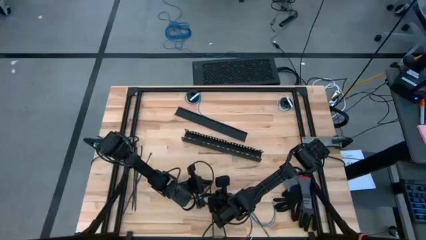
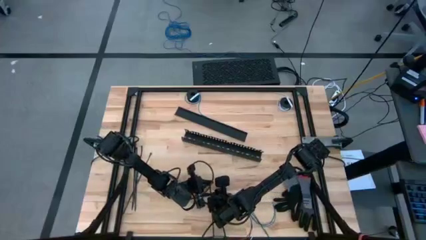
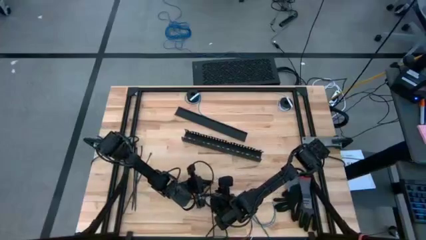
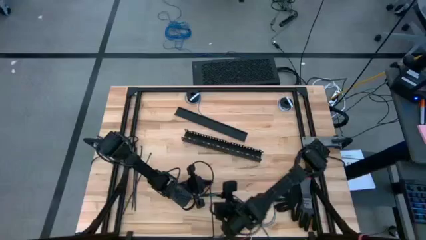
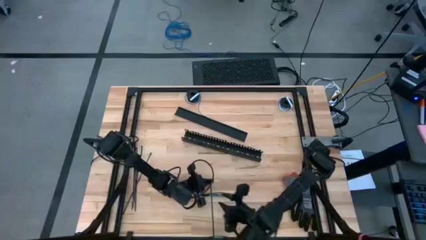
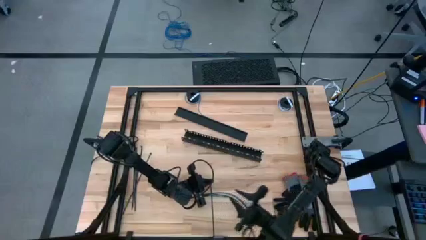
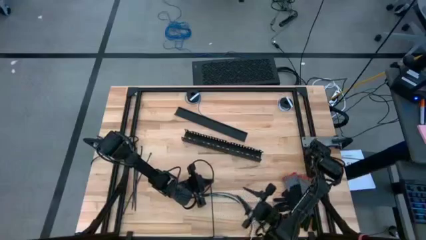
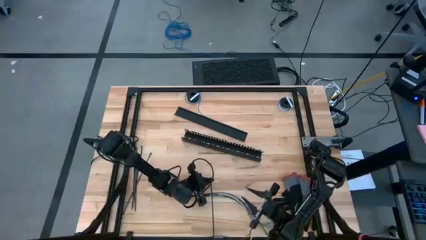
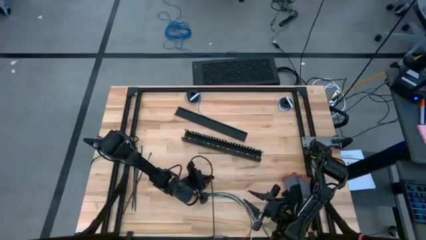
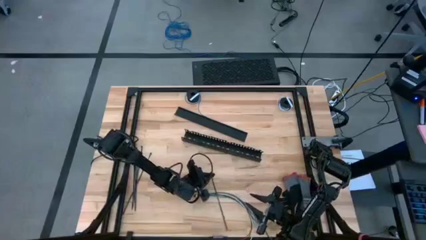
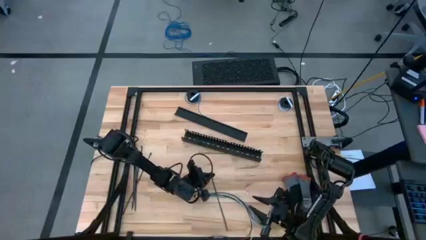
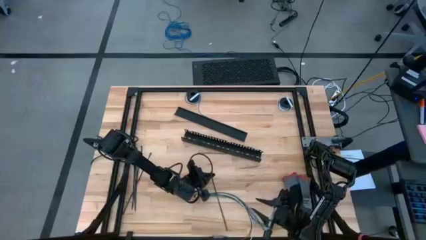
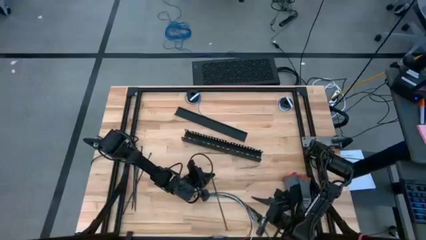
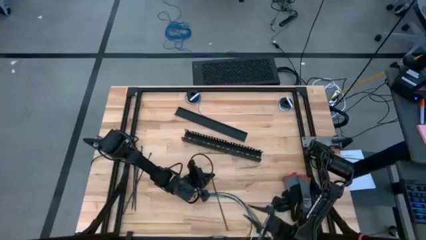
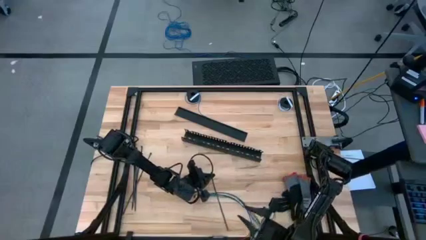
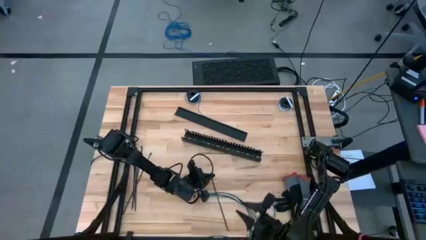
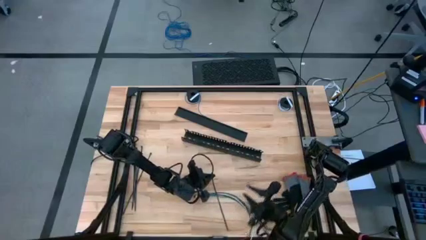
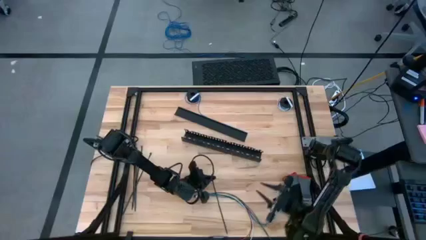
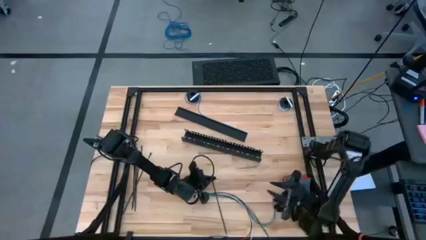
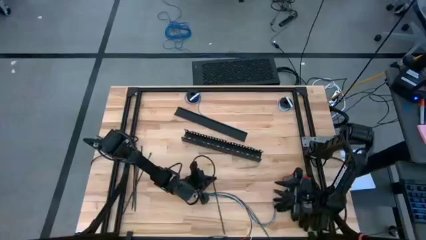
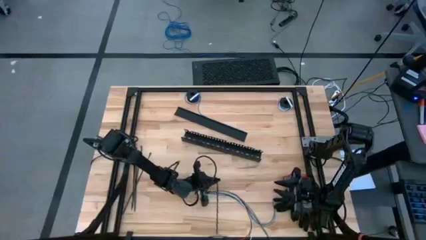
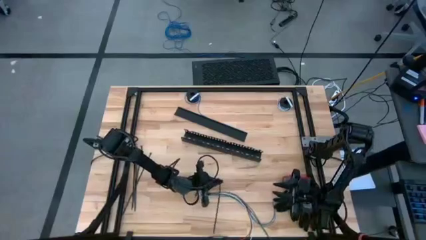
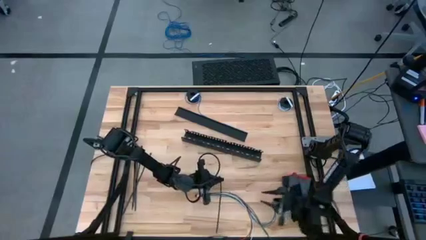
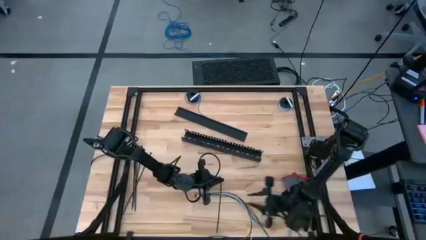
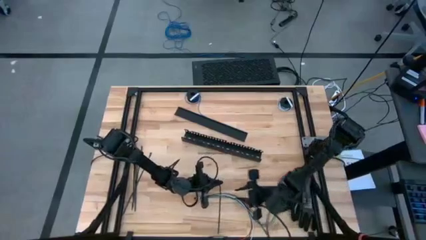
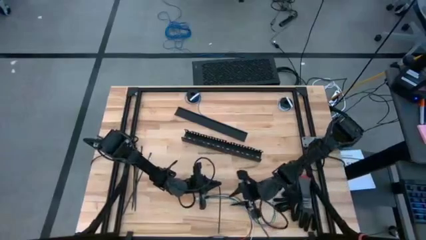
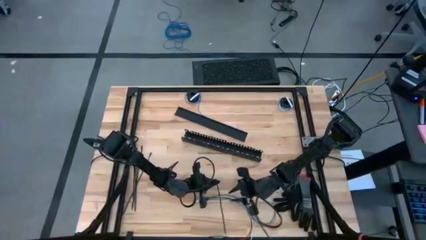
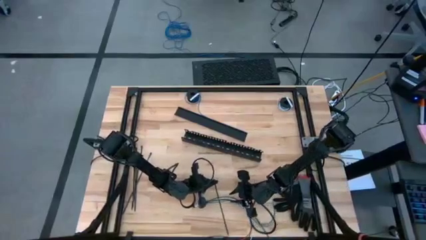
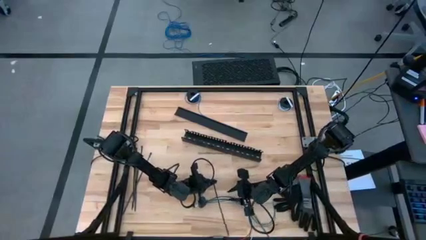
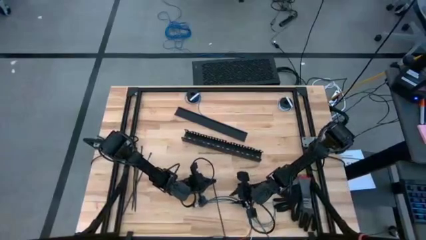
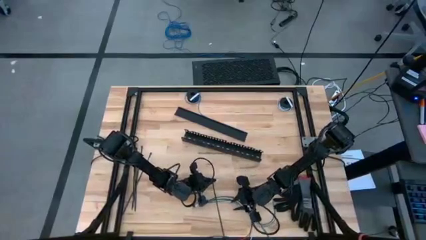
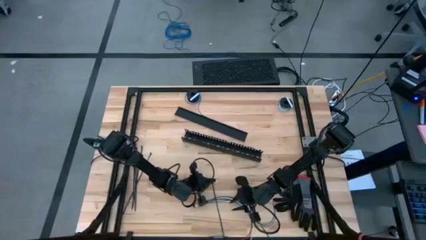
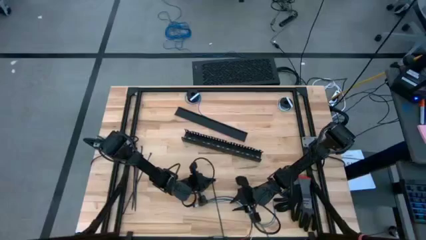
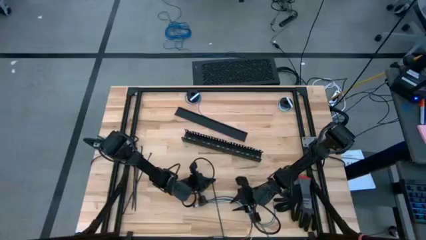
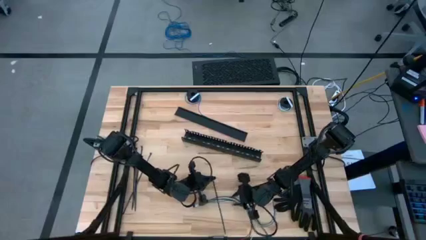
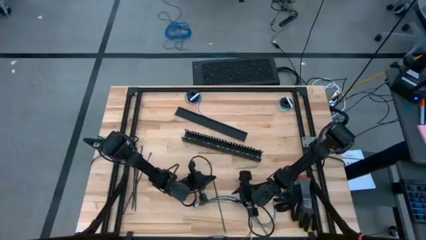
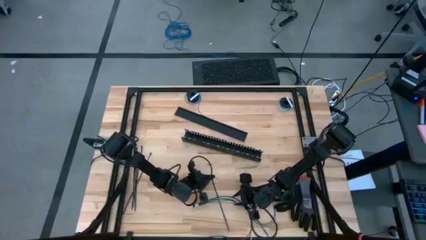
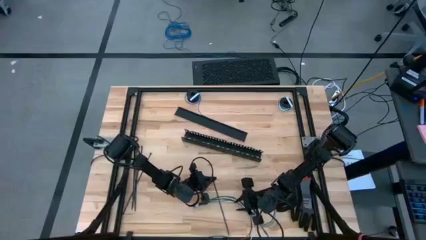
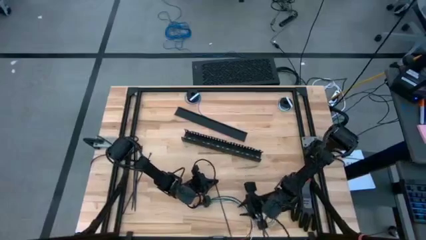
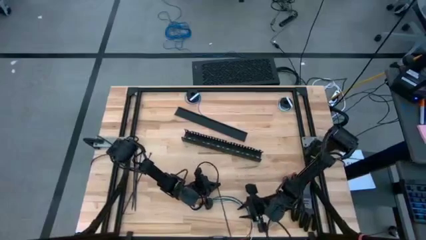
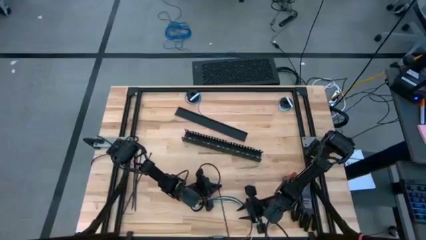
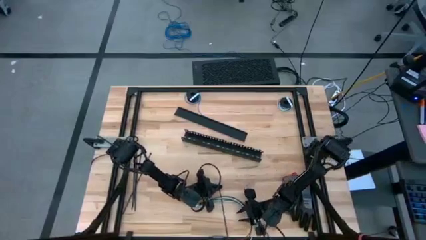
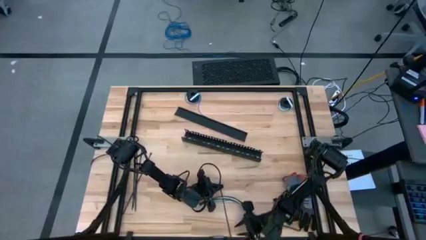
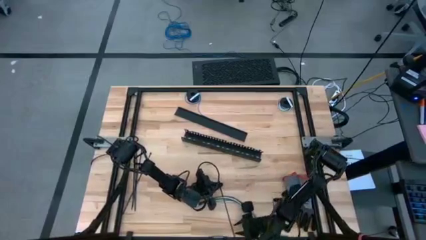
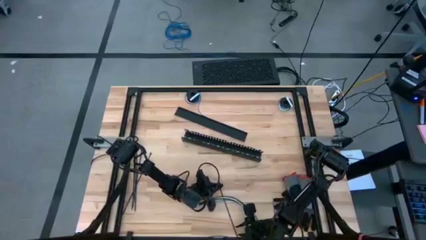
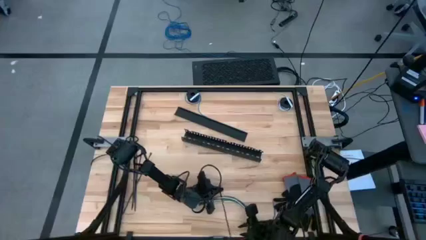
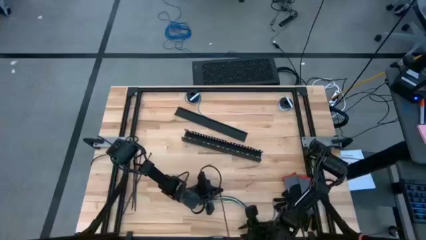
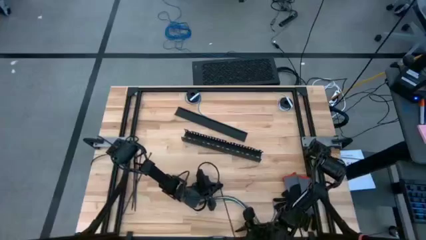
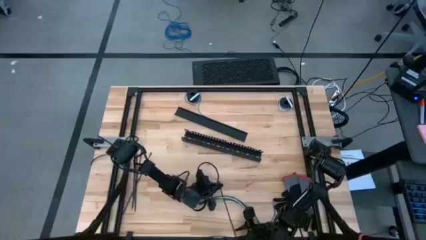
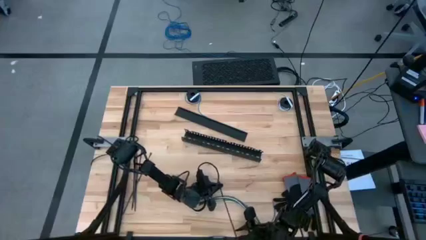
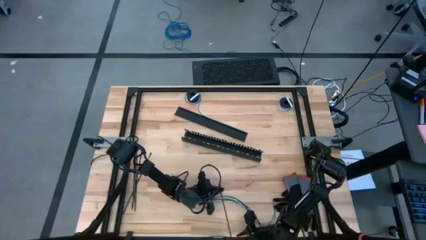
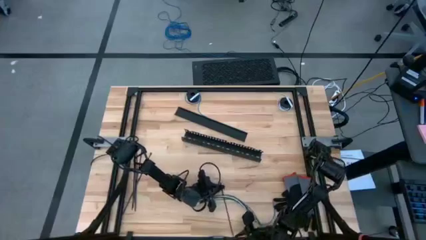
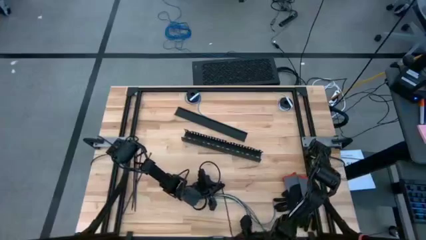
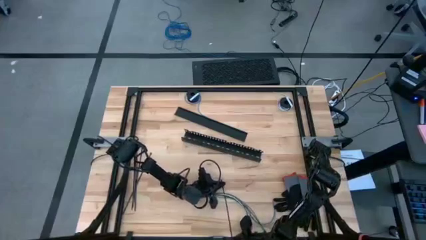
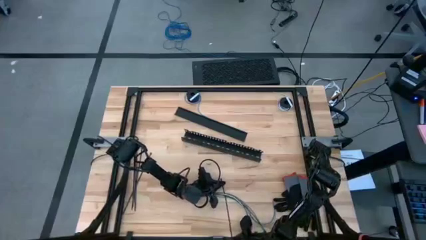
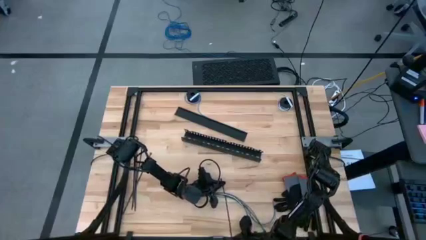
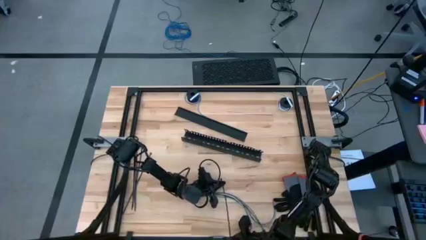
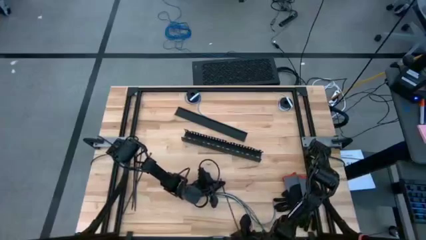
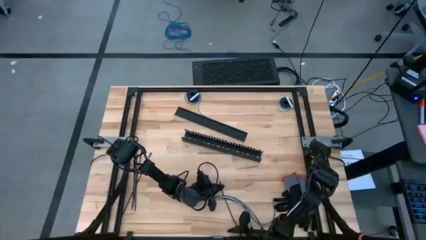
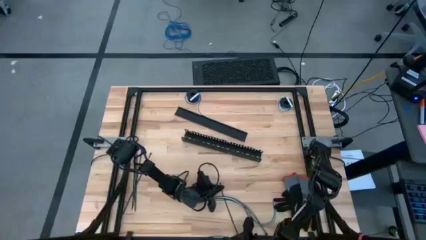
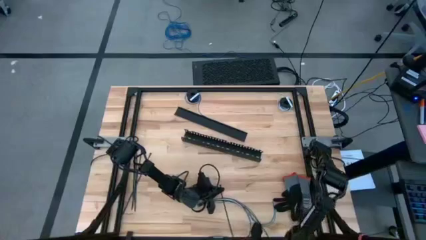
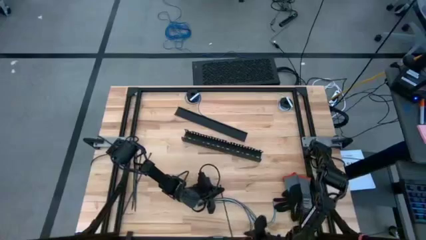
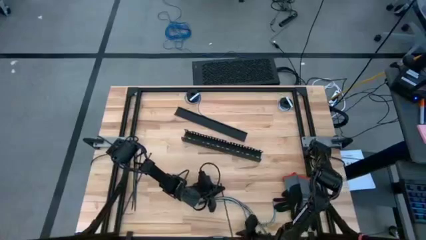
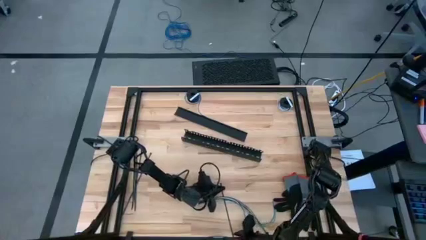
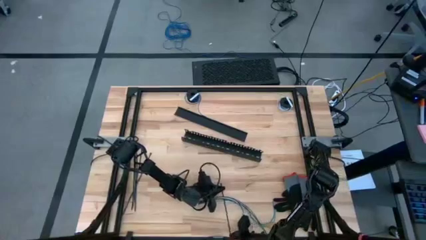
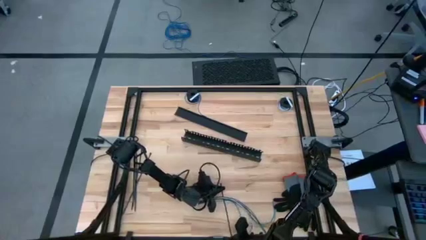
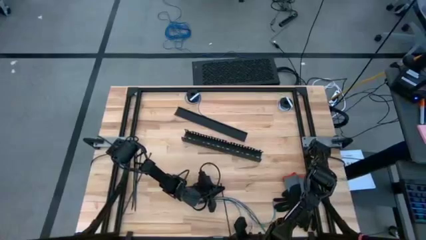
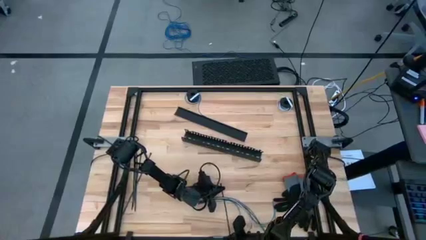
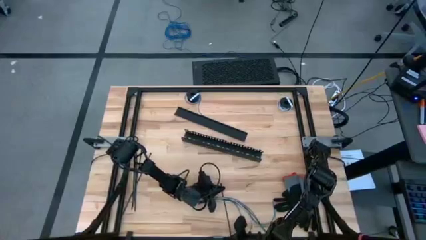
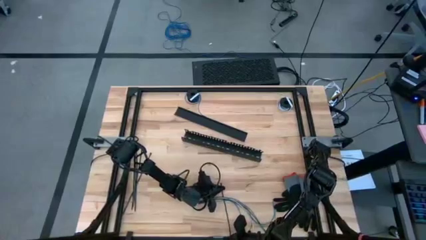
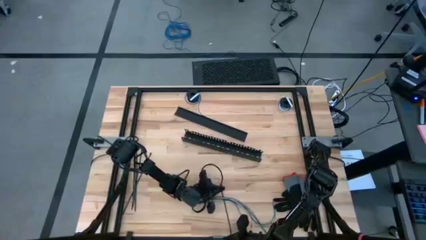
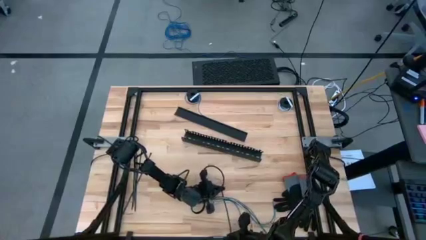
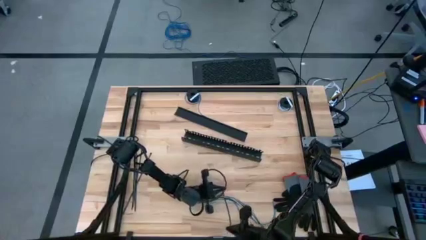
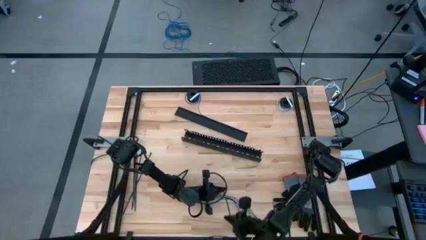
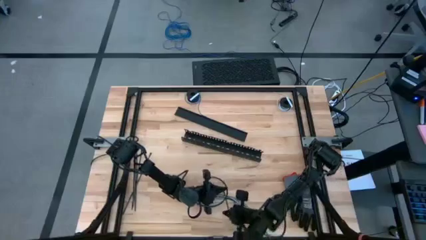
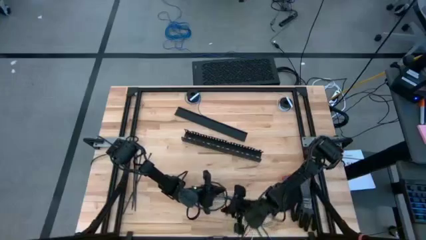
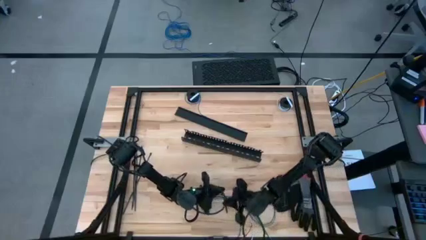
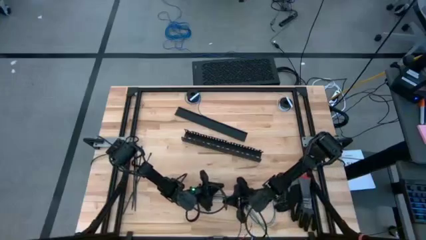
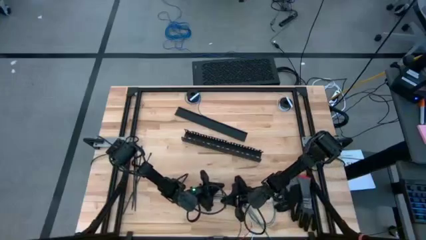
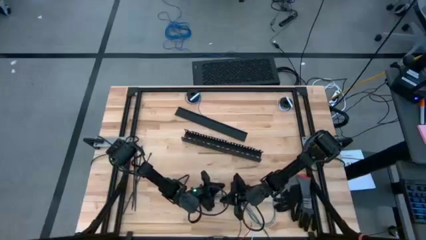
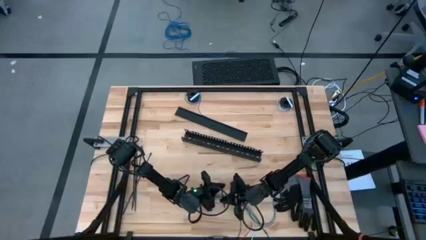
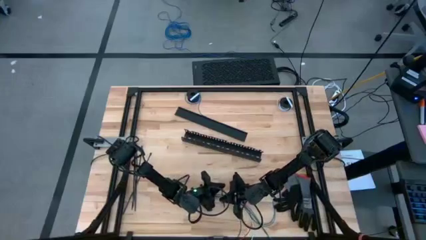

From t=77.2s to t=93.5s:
Task: Ziptie cables
Wrap the cable wires with the black zip tie
